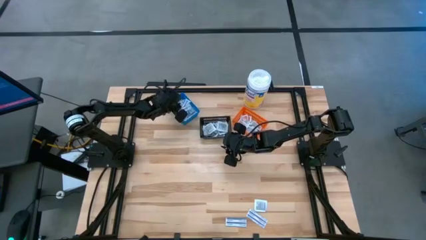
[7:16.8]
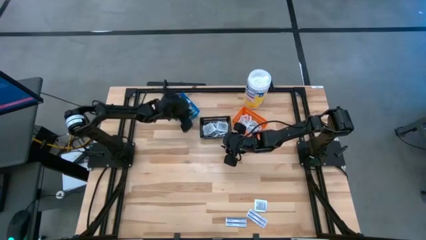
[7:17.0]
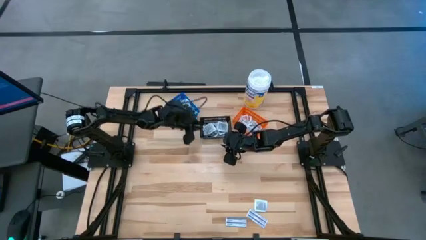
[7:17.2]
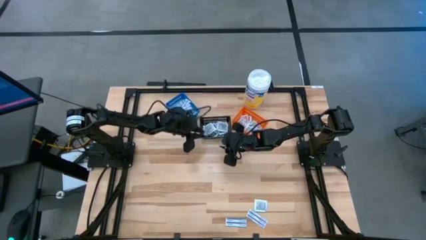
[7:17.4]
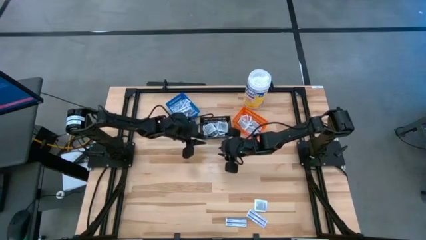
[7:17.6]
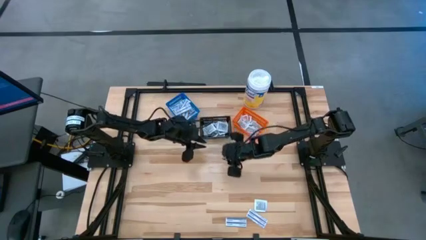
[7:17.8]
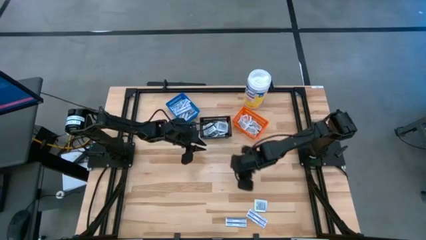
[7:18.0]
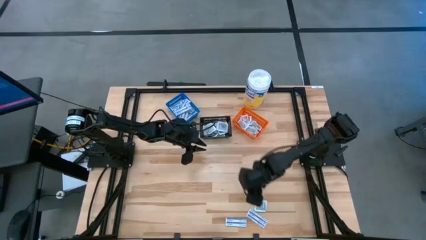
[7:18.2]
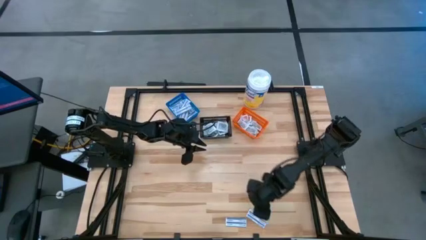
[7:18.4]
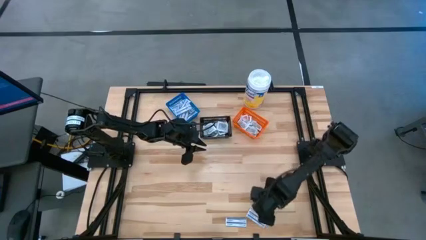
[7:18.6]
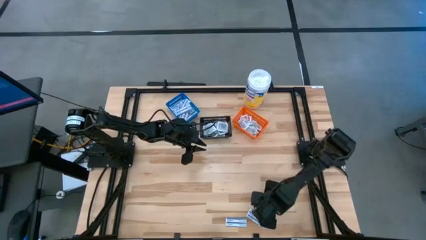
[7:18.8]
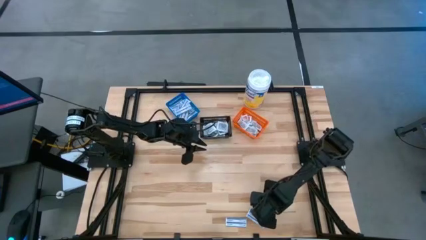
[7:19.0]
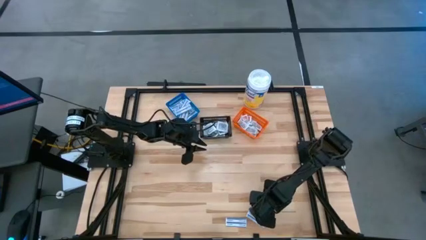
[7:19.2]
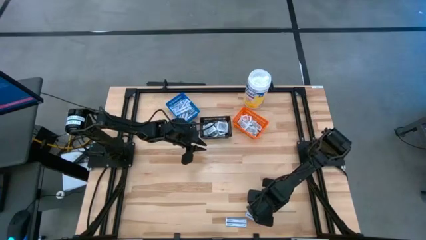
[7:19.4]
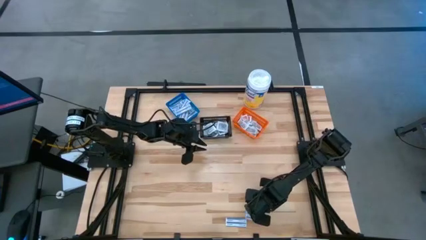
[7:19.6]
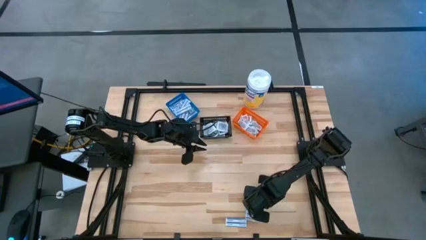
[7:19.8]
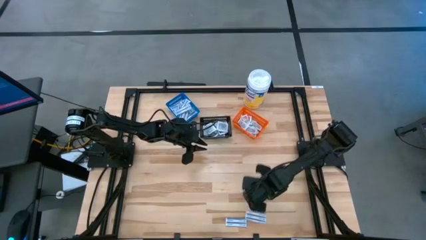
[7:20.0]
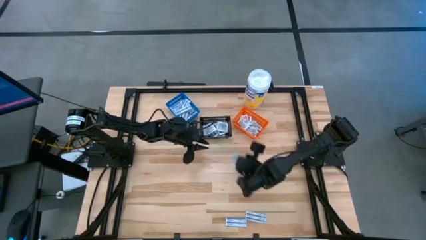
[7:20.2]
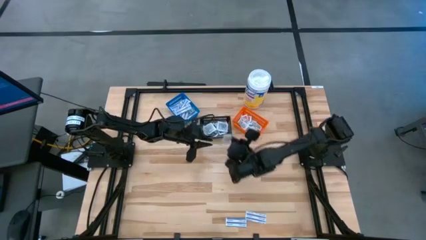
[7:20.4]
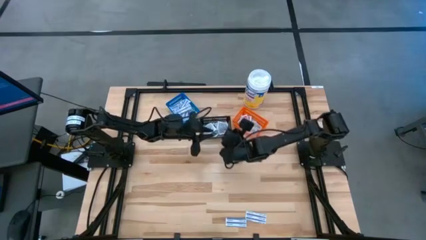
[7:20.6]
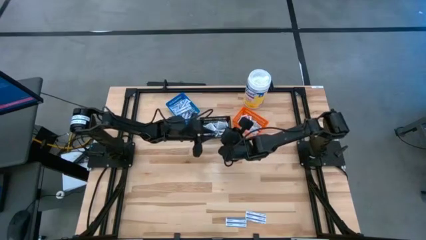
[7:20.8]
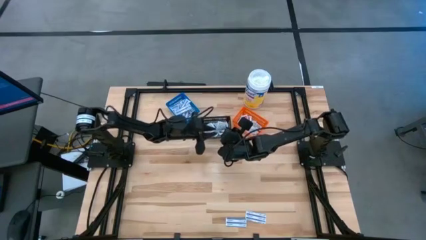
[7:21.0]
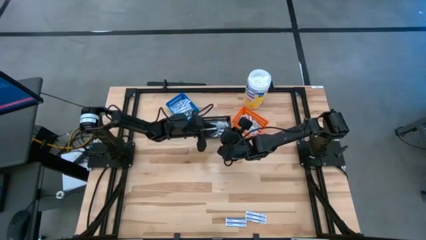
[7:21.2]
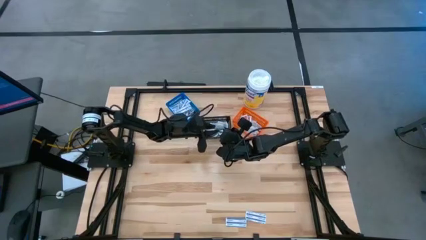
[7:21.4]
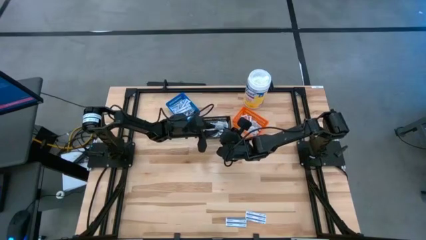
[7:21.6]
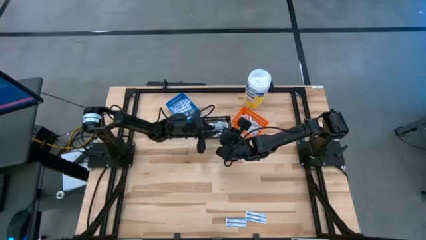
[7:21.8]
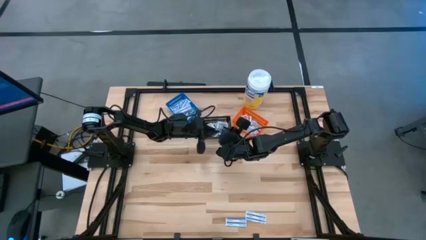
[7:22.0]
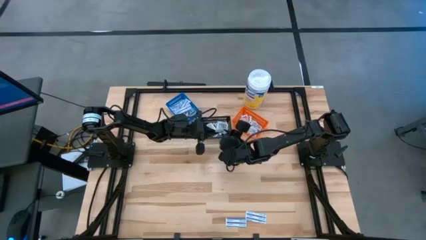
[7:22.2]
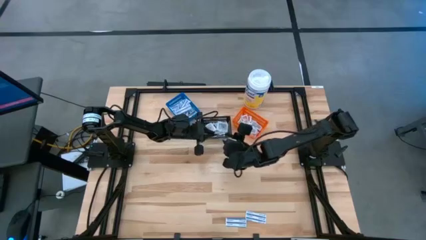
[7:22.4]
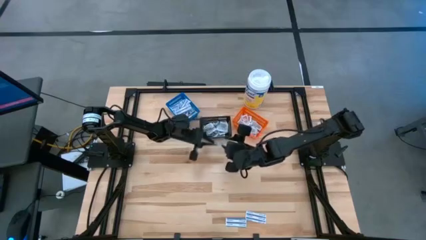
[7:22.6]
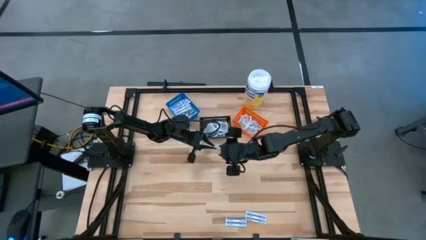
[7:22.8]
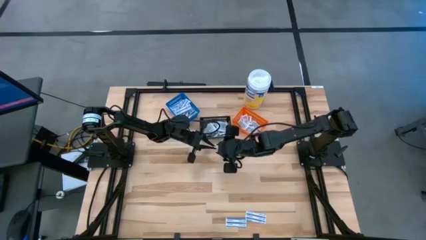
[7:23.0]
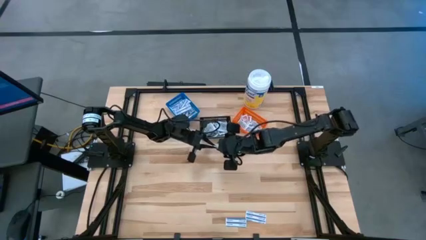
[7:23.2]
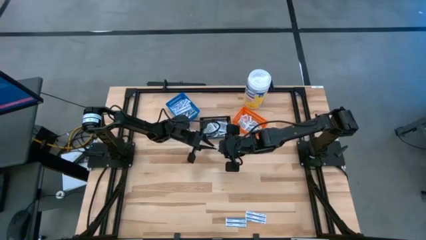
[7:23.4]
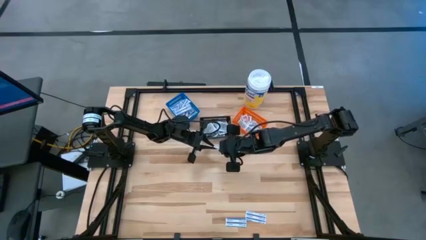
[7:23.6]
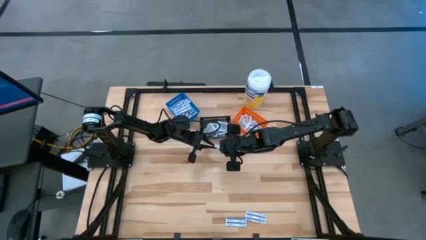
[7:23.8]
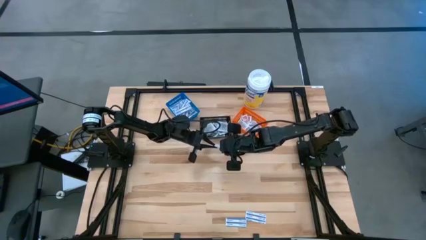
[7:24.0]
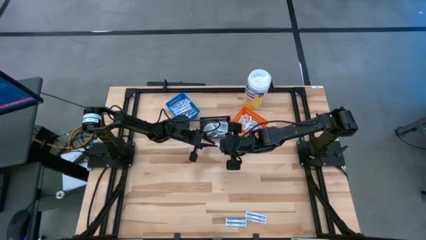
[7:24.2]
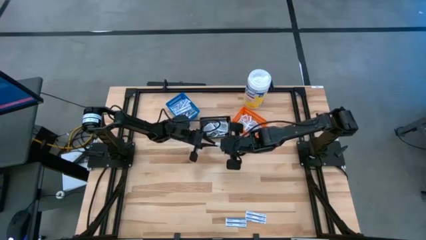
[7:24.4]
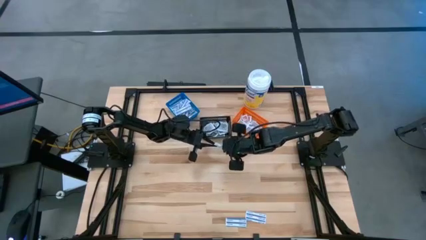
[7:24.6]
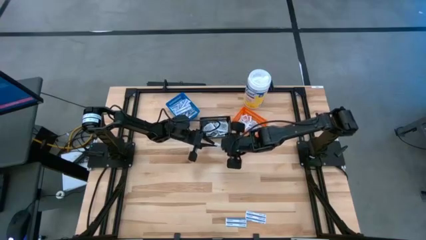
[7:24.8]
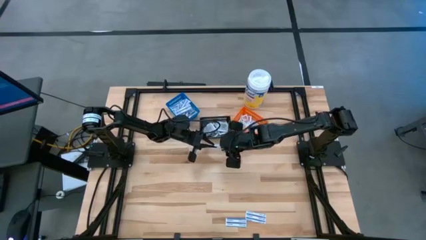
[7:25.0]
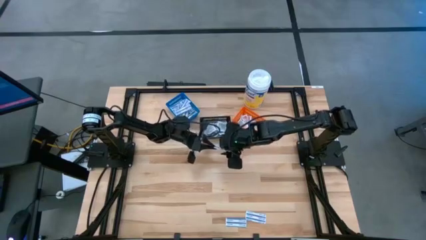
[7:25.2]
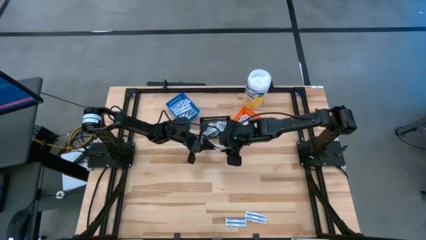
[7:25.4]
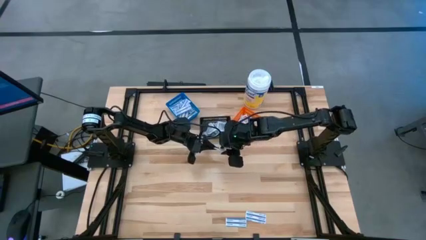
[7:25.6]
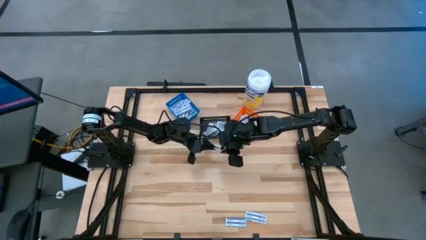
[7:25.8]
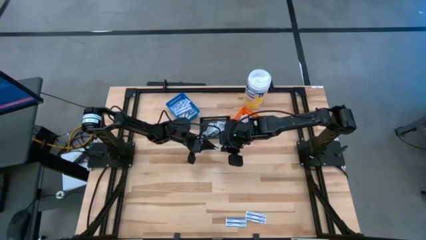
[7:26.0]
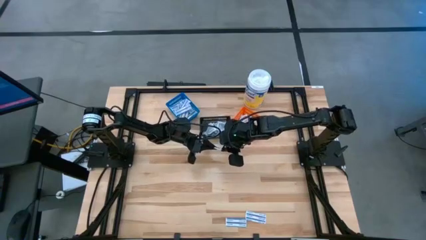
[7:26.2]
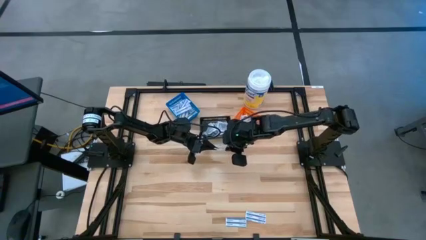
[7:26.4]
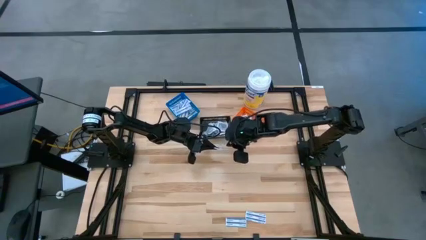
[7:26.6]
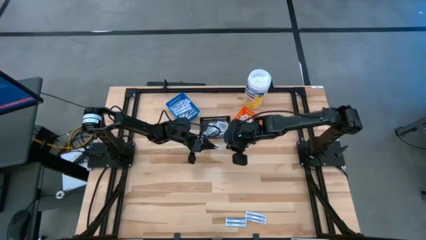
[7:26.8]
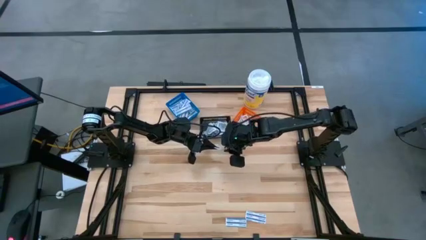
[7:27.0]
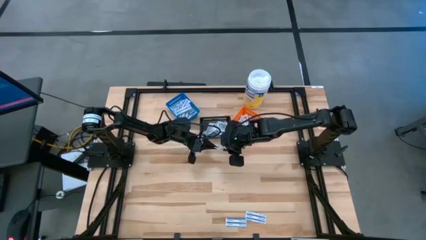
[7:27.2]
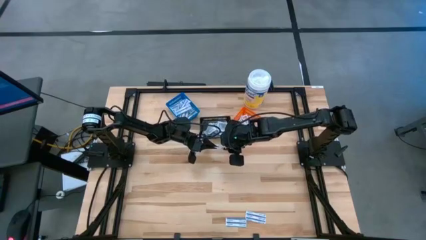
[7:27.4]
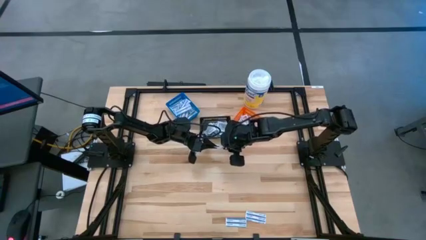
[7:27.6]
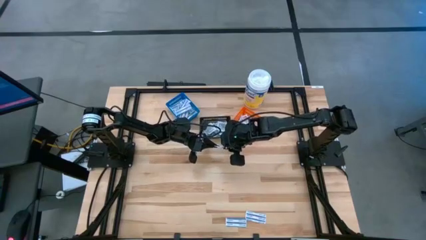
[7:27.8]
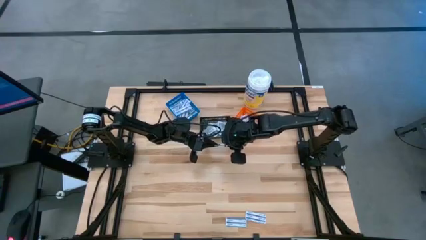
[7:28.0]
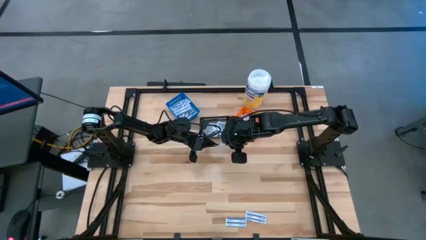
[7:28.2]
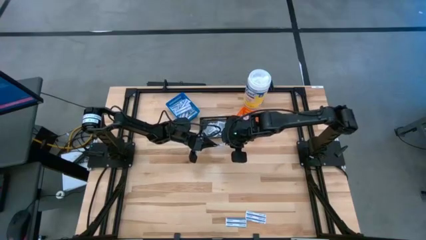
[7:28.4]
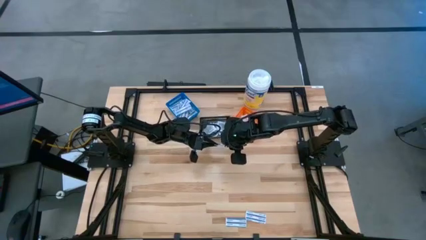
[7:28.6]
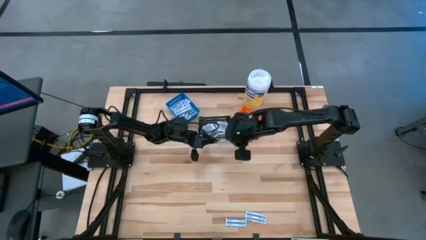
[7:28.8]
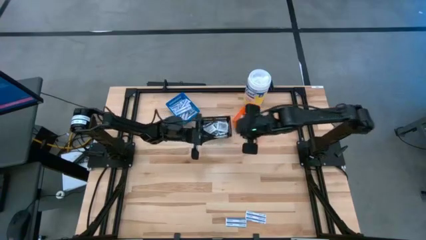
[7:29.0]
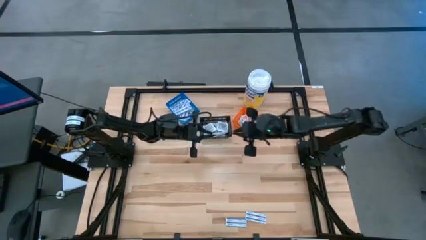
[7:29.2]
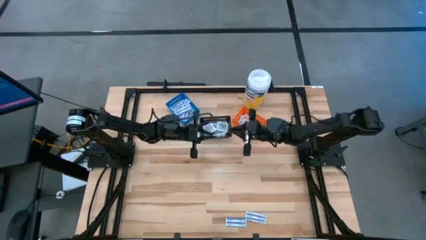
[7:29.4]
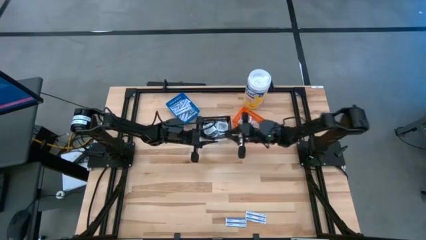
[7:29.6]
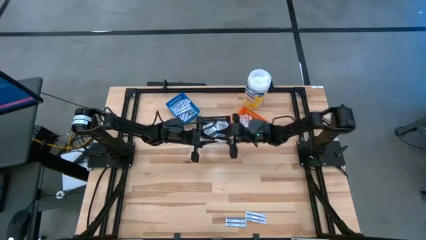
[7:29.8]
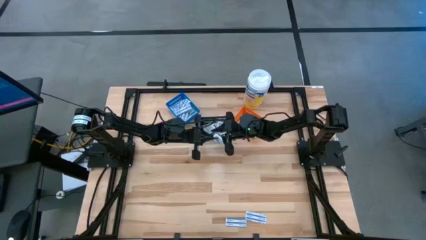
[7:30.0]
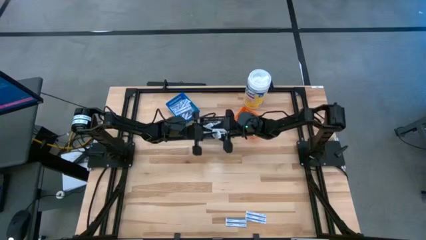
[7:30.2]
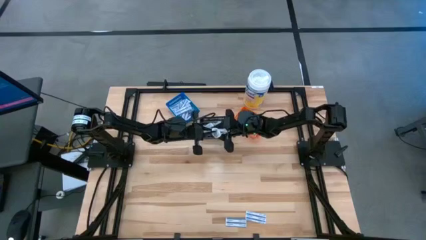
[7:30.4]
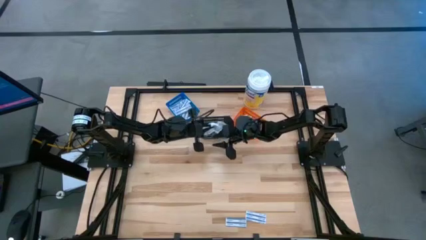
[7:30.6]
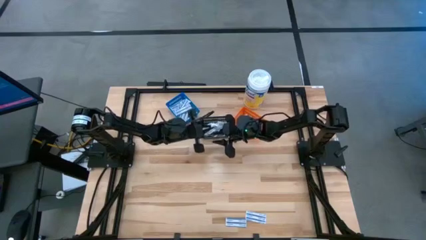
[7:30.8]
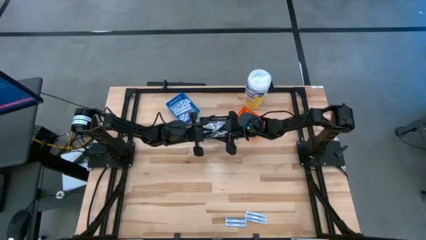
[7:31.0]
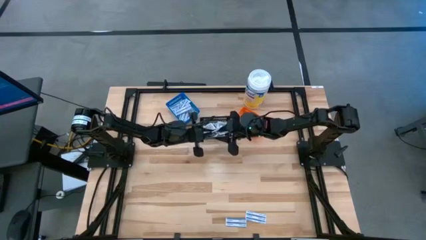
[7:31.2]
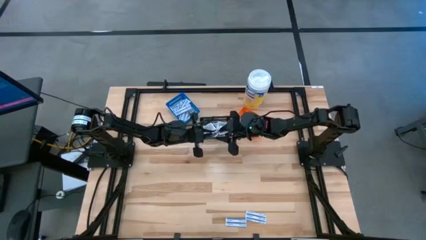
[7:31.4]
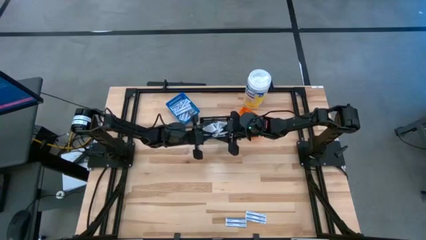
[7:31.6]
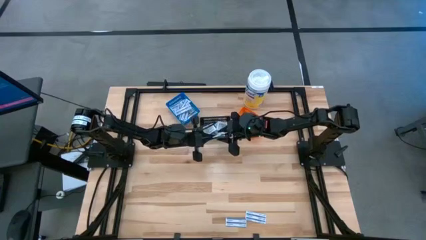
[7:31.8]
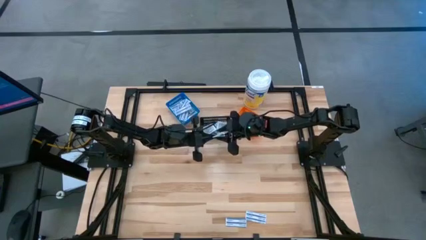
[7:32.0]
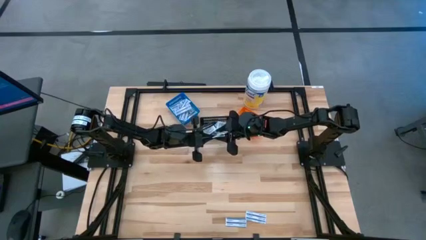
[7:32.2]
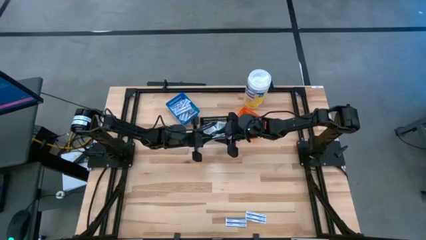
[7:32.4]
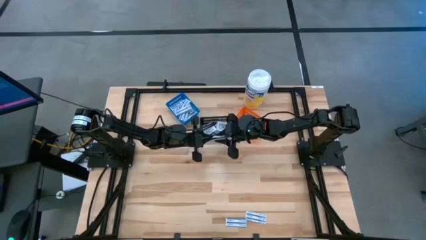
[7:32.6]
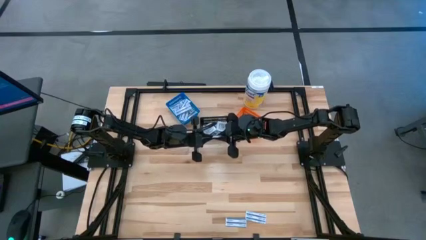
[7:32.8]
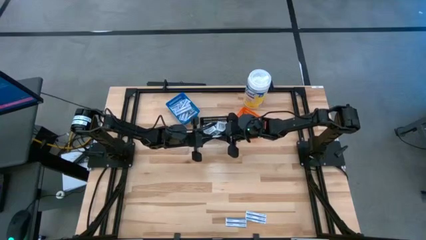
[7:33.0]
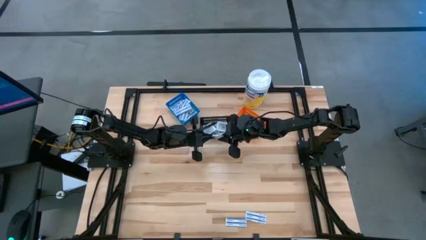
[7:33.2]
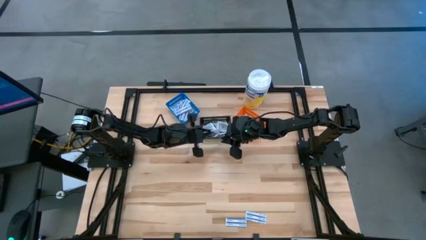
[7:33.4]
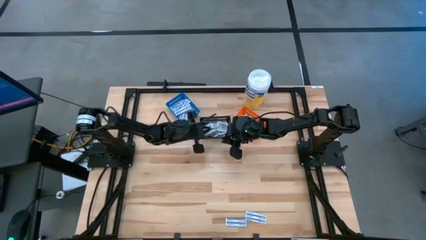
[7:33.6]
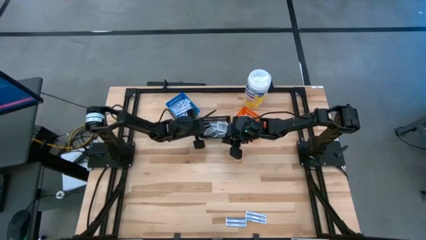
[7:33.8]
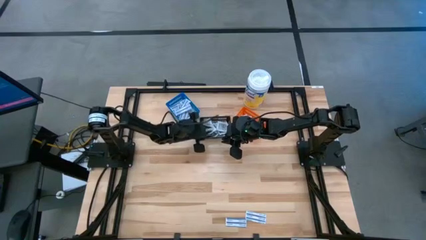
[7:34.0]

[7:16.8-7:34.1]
Task: Pick & Place First Aid Supplies
Put the towelette pack into the black bin
